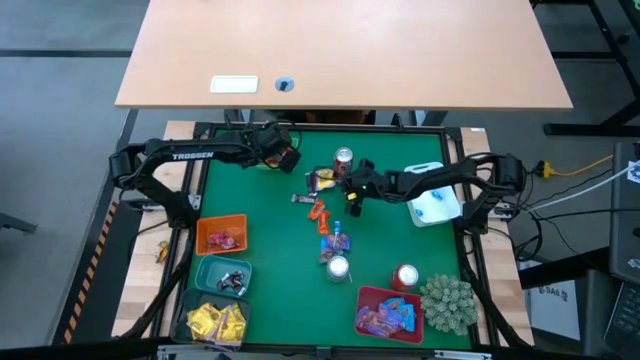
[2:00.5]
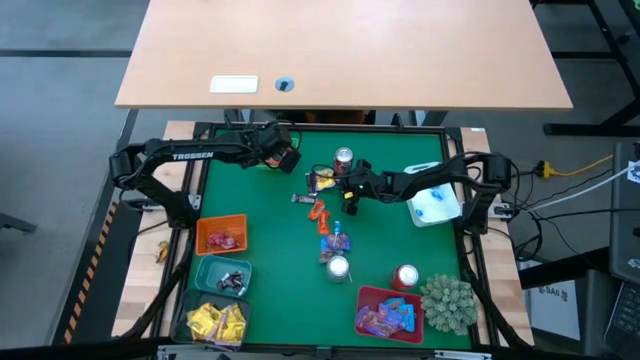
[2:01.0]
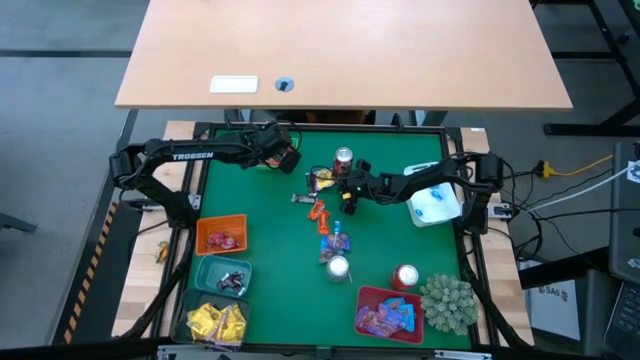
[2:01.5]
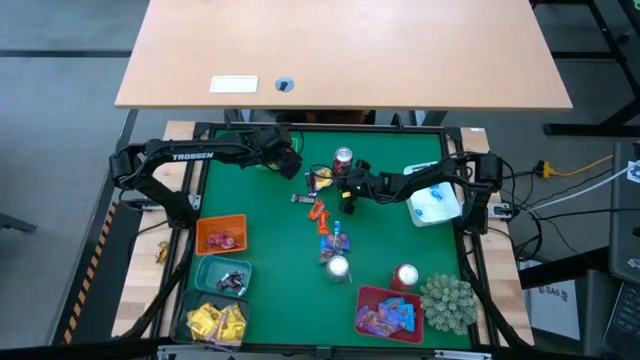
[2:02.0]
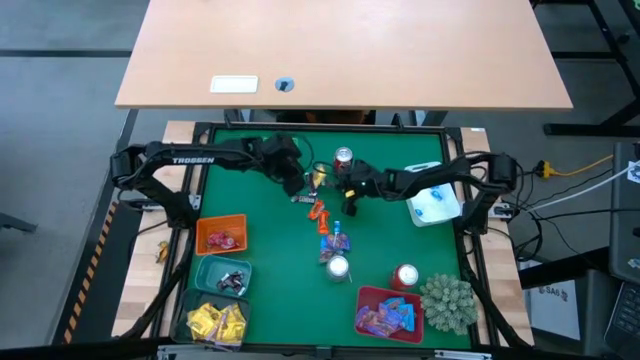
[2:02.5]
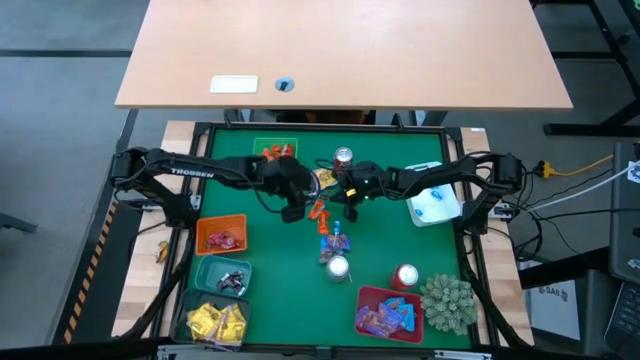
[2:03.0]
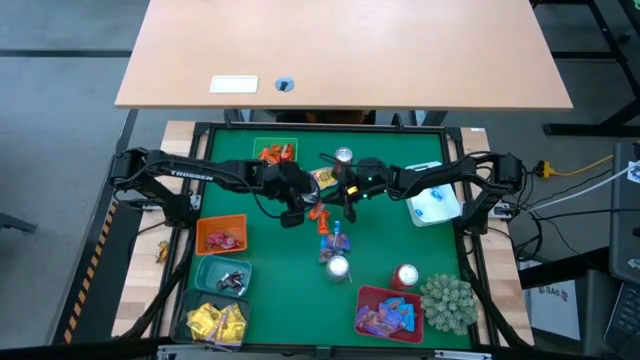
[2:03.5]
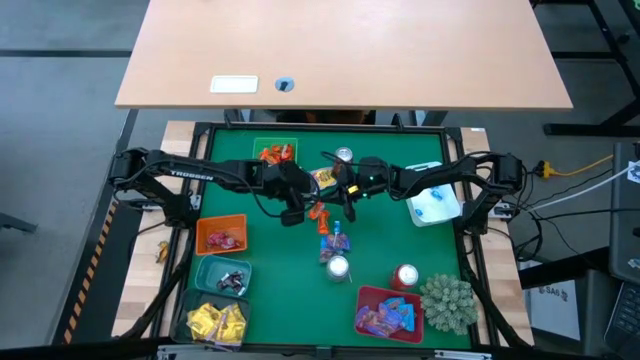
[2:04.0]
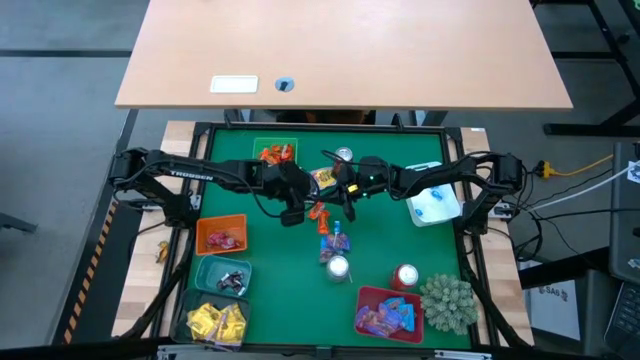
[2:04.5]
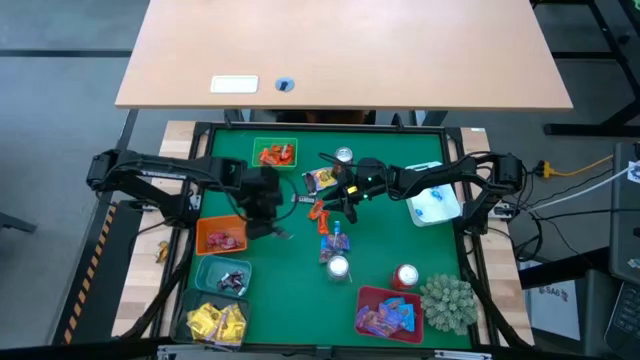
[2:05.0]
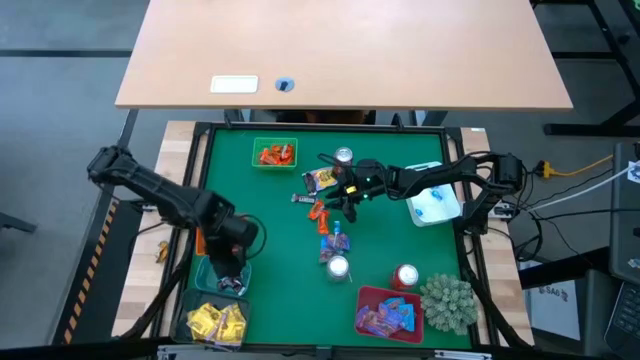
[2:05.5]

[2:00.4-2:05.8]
Task: Sort candy
Put the brown chocolate into the blue bin

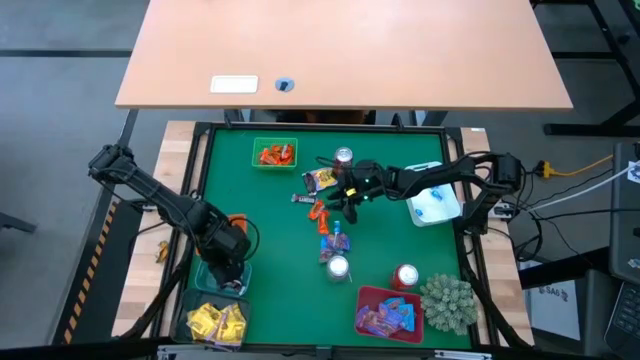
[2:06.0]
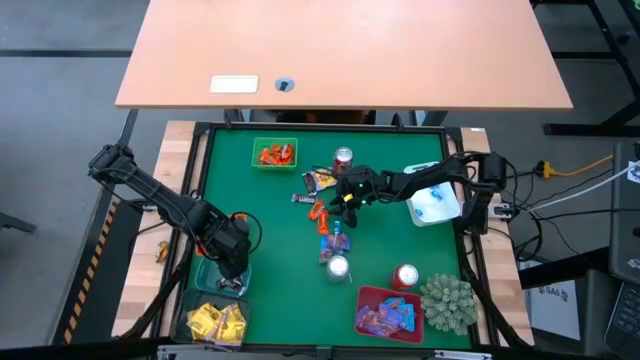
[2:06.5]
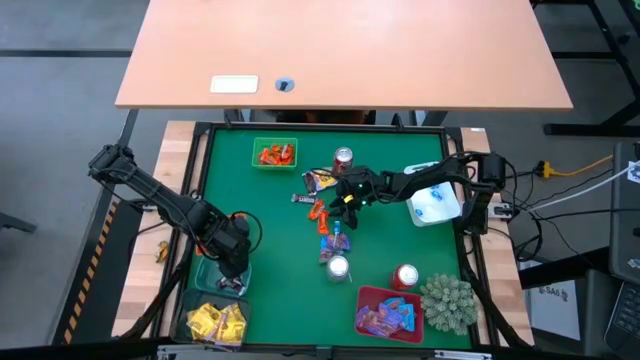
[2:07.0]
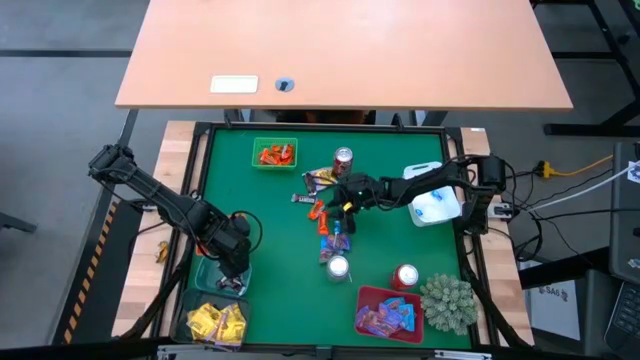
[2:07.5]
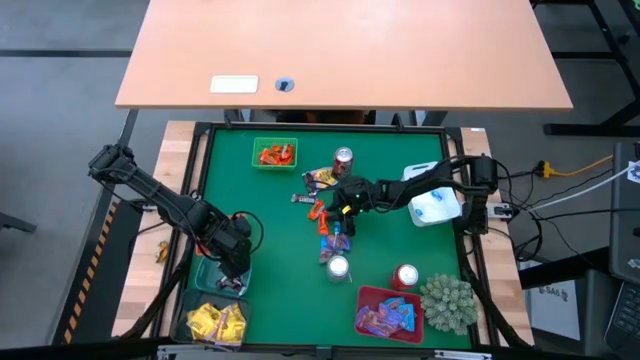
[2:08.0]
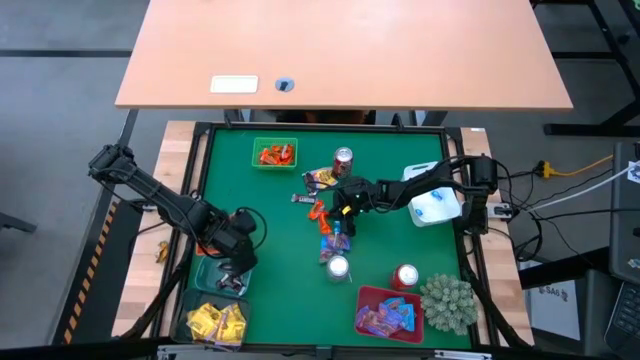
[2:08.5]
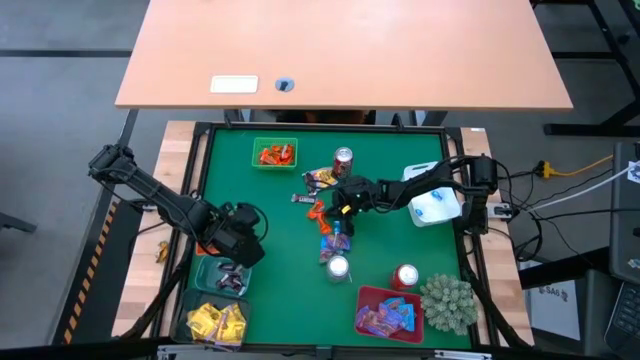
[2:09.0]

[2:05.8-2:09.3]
Put the orange chocolate into the green bin

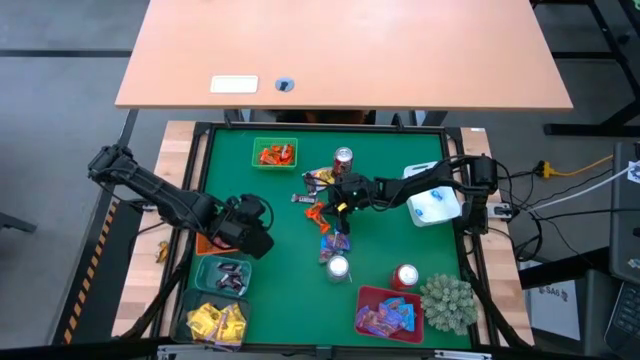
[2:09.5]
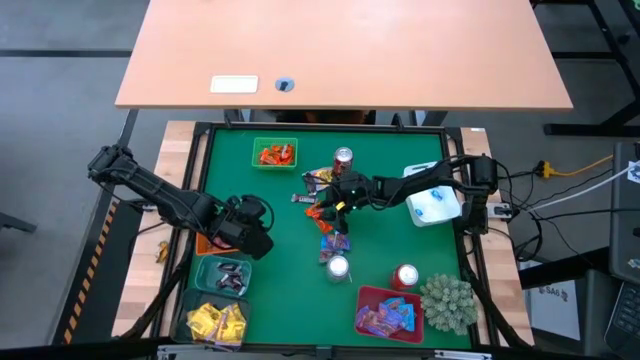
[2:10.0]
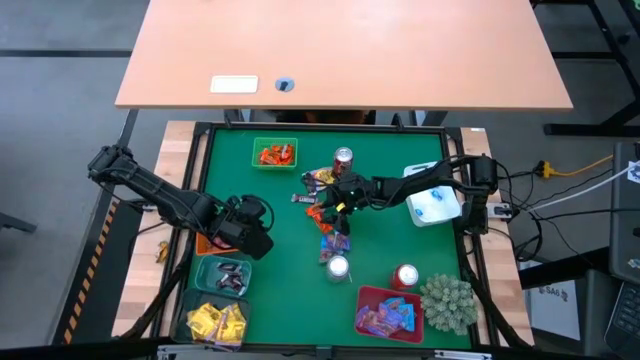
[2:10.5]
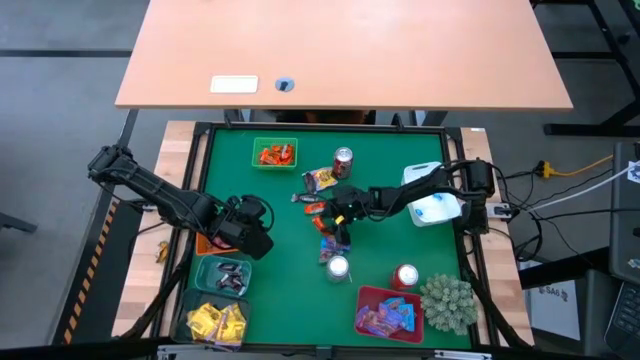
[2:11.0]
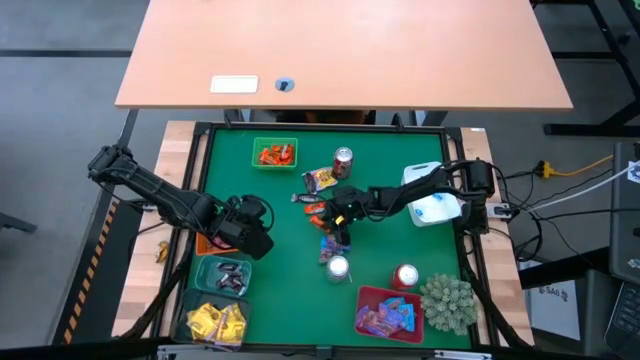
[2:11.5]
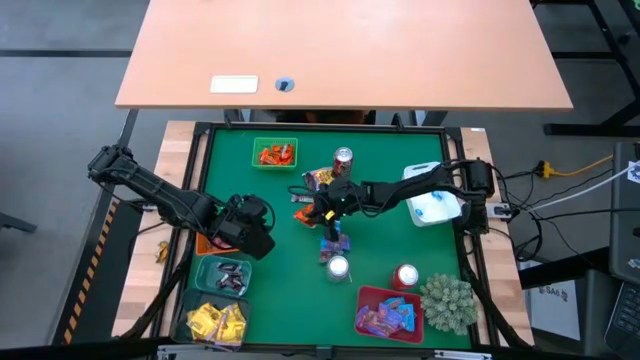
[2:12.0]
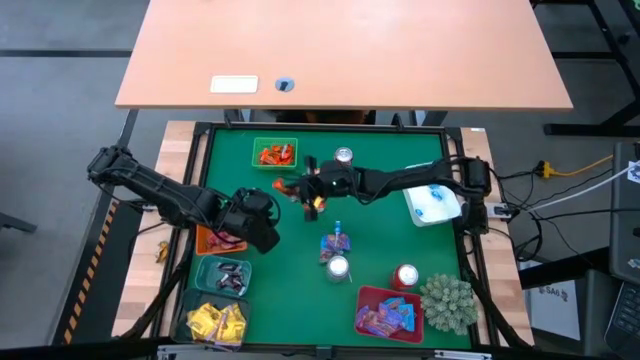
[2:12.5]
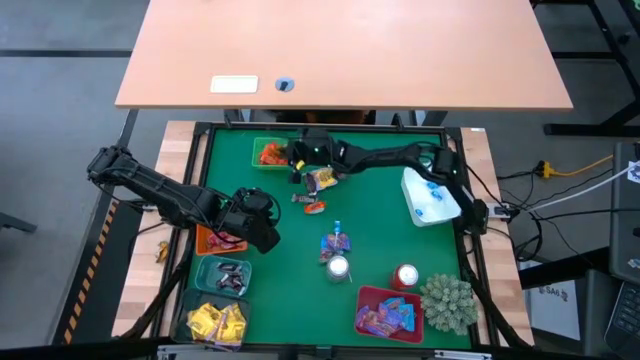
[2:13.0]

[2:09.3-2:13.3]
Put the orange chocolate into the green bin

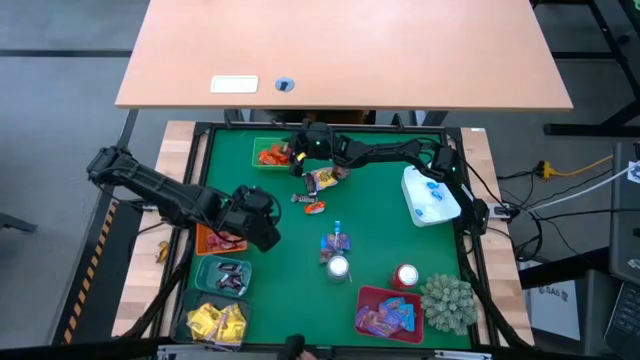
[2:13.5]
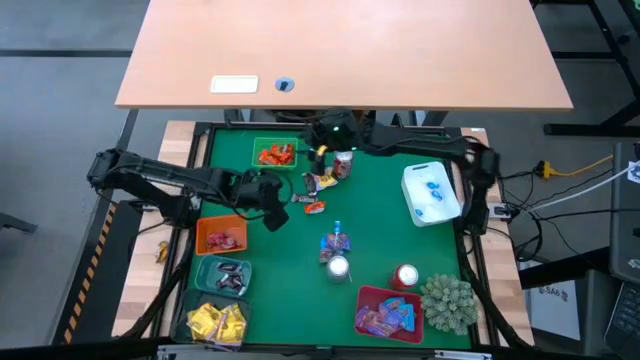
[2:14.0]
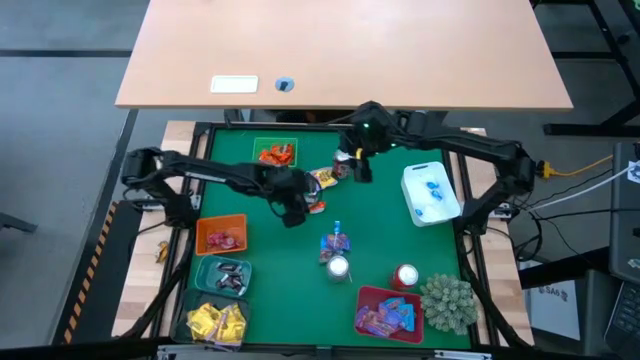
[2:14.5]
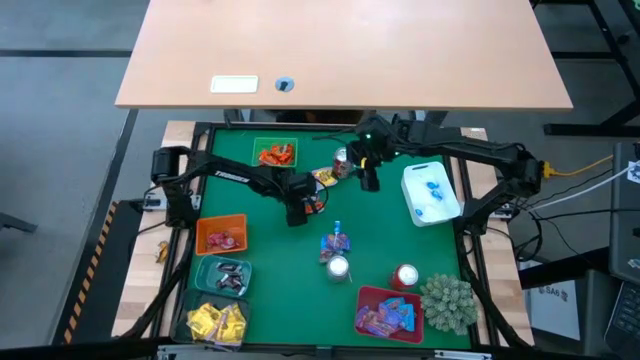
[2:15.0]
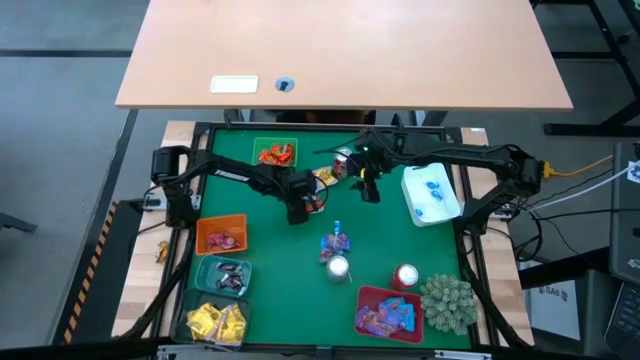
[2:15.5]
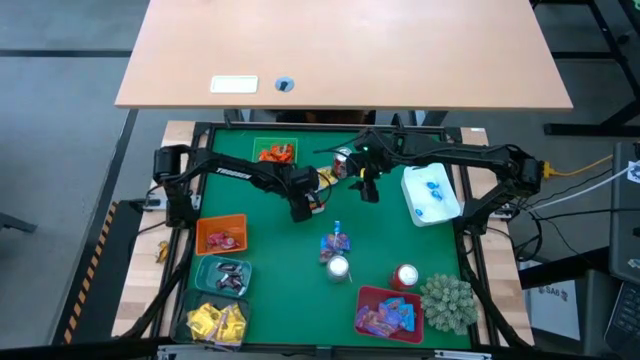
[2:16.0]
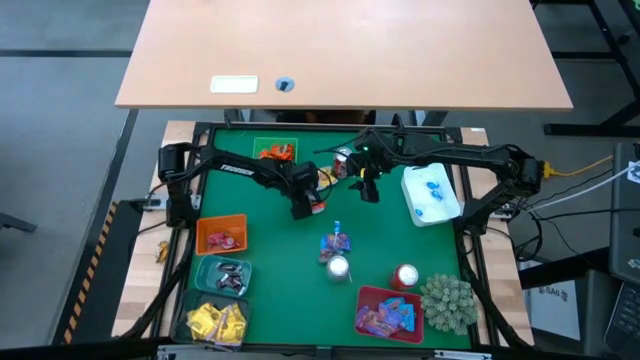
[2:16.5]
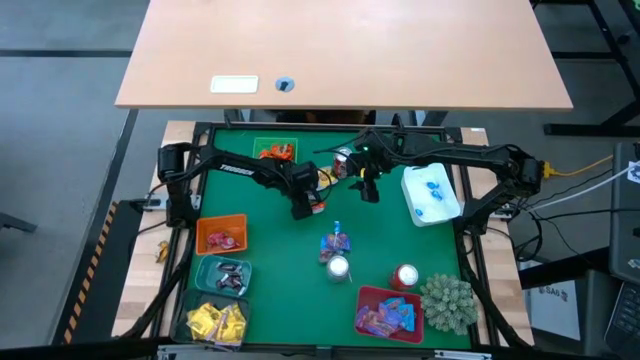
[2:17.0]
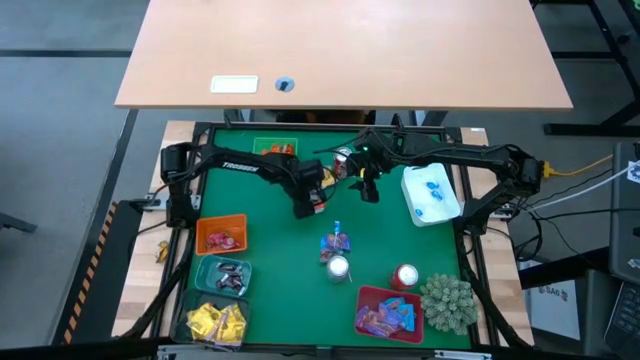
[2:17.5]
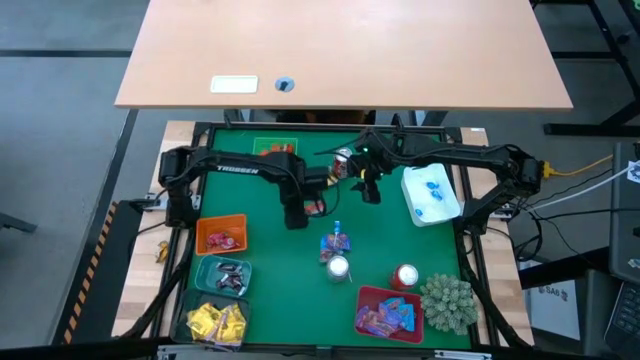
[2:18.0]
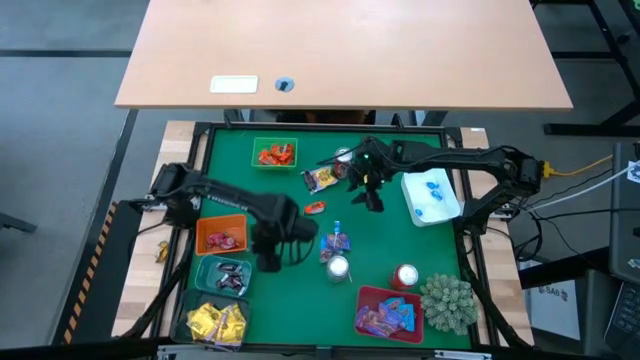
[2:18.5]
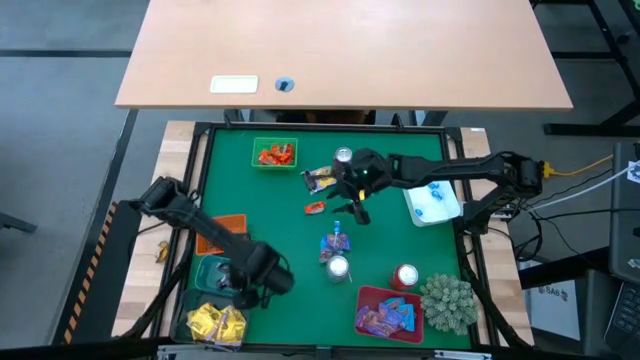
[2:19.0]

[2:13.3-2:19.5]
Put the brown chocolate into the blue bin

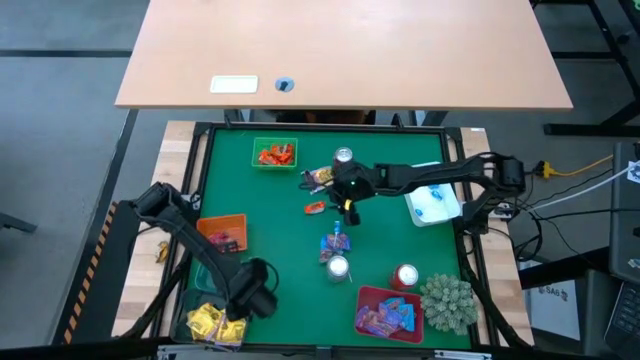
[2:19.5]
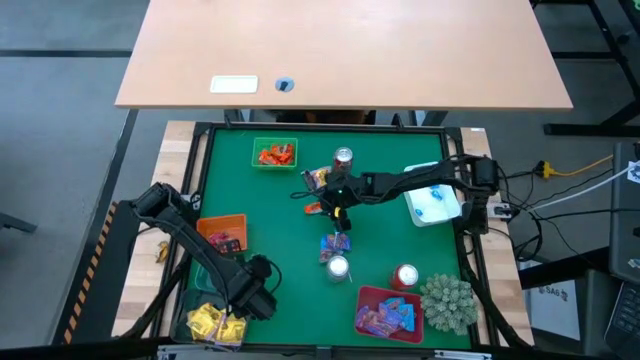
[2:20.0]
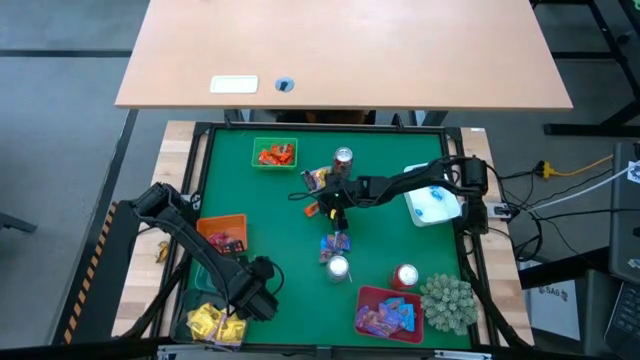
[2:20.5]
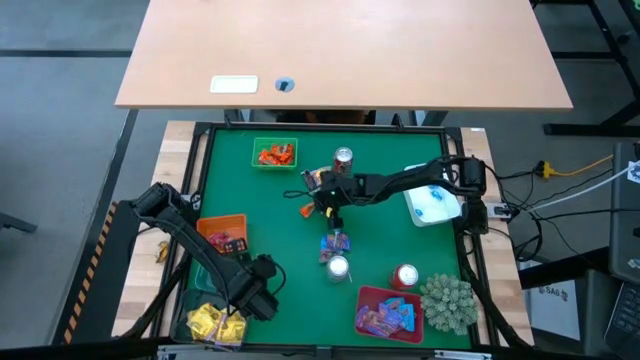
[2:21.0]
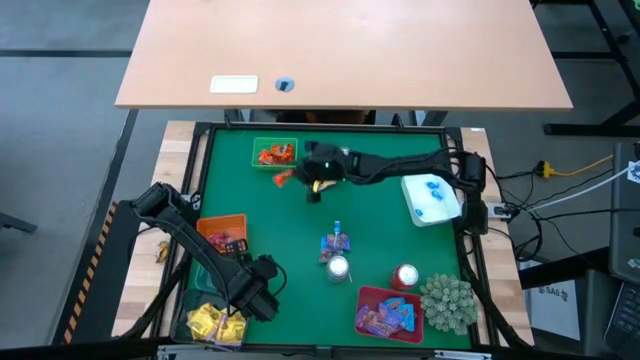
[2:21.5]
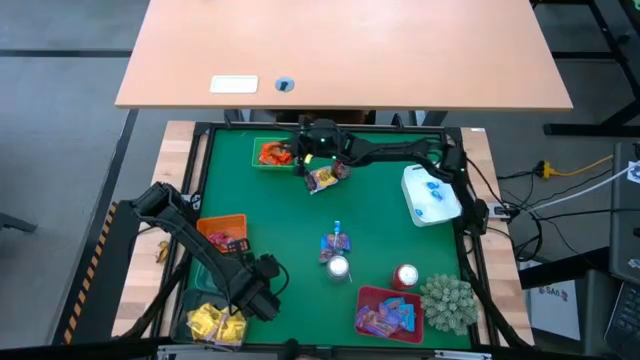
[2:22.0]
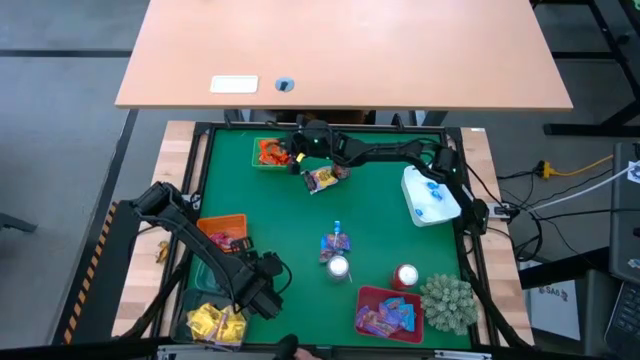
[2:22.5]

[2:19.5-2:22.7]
Put the orange chocolate into the green bin
